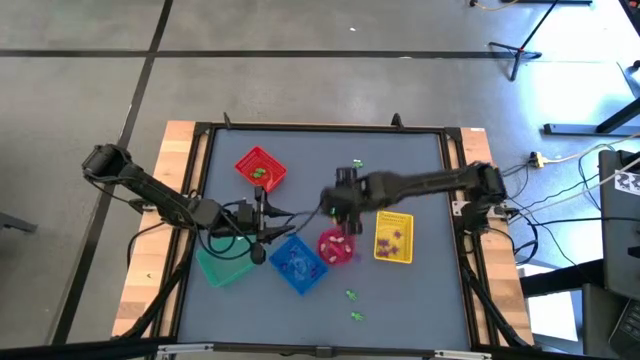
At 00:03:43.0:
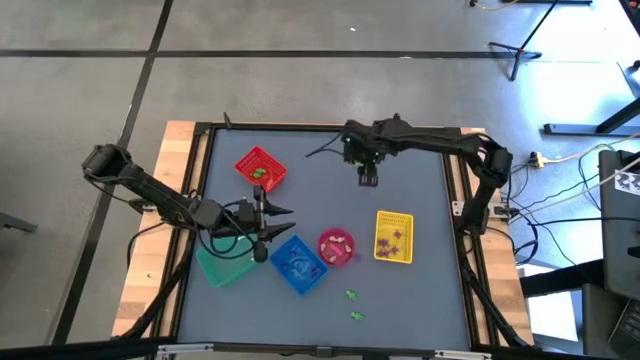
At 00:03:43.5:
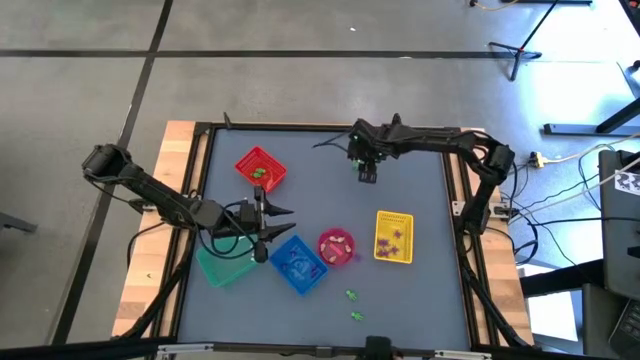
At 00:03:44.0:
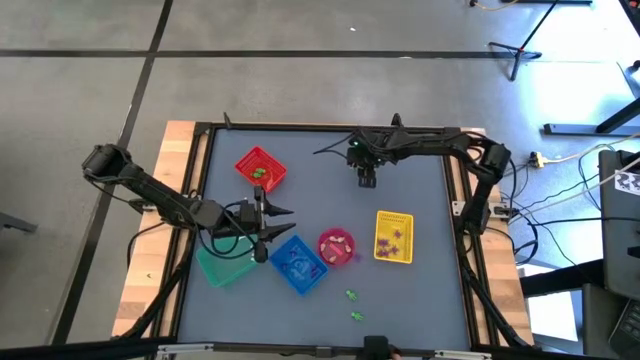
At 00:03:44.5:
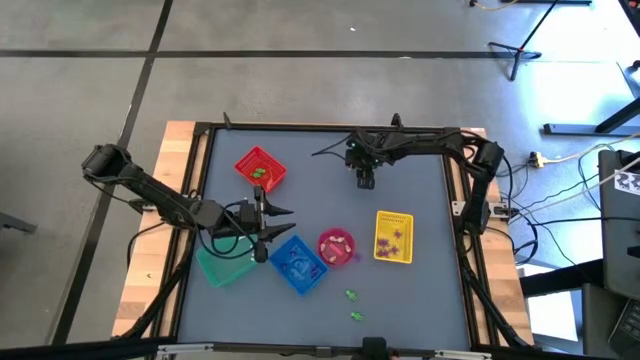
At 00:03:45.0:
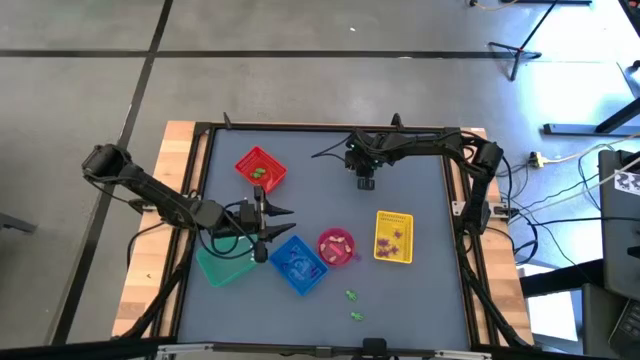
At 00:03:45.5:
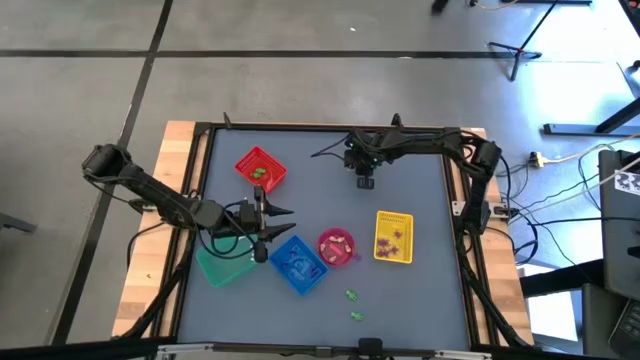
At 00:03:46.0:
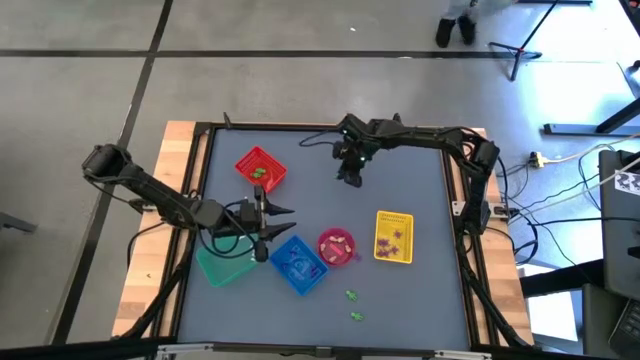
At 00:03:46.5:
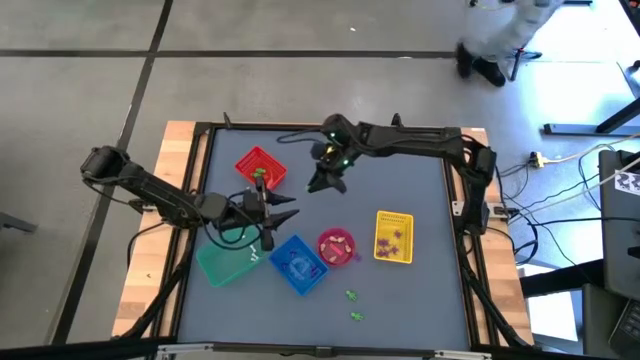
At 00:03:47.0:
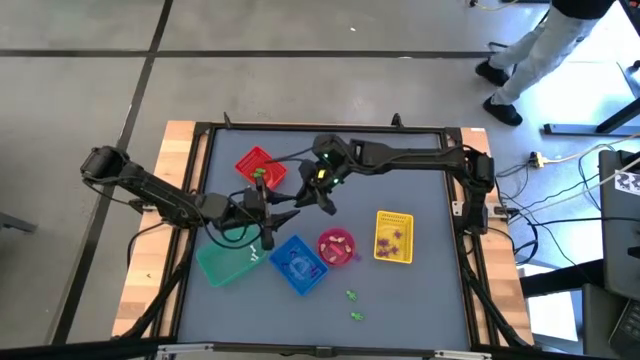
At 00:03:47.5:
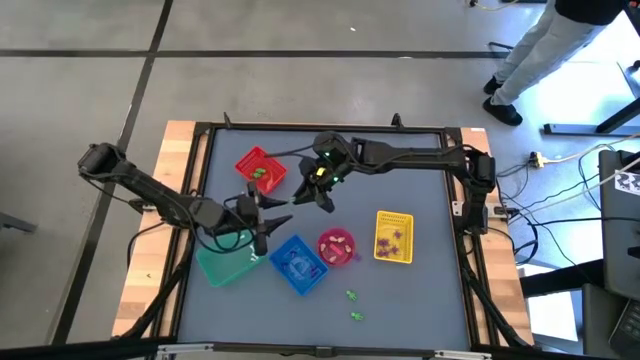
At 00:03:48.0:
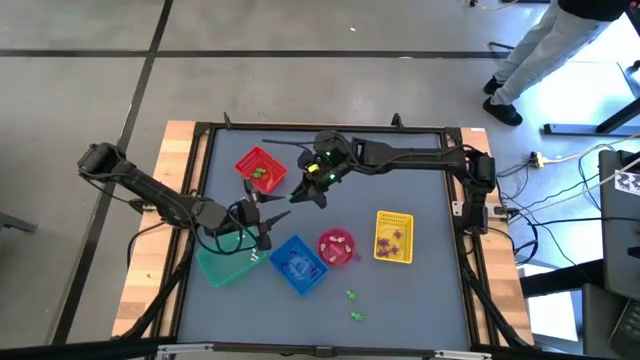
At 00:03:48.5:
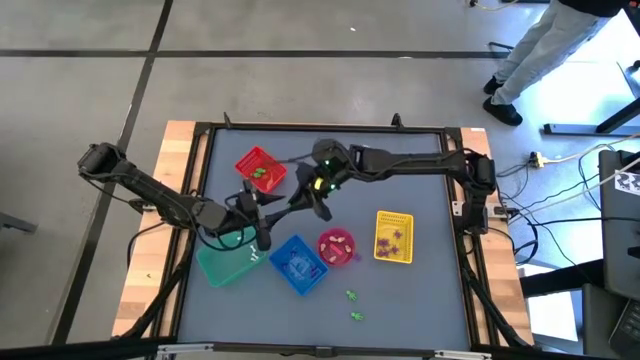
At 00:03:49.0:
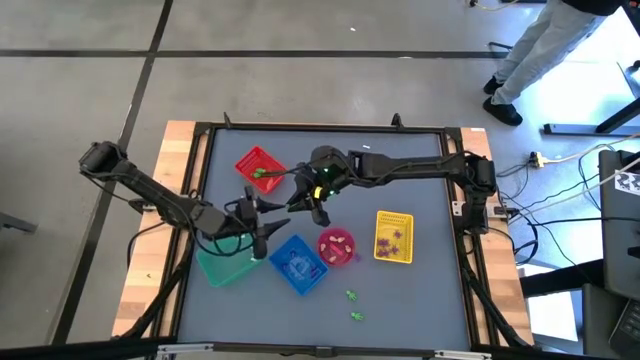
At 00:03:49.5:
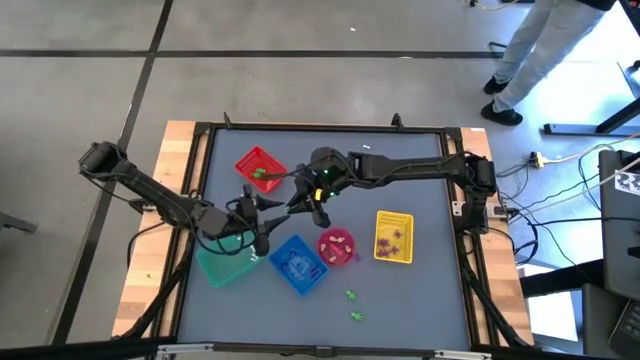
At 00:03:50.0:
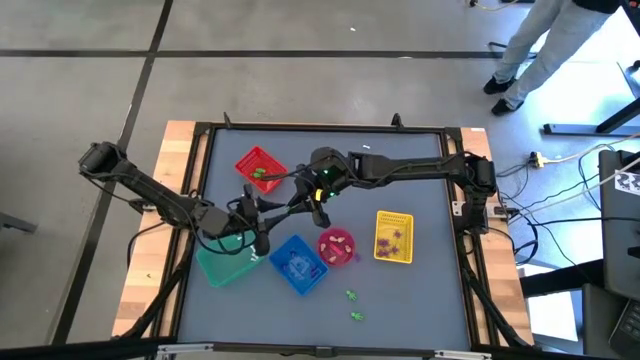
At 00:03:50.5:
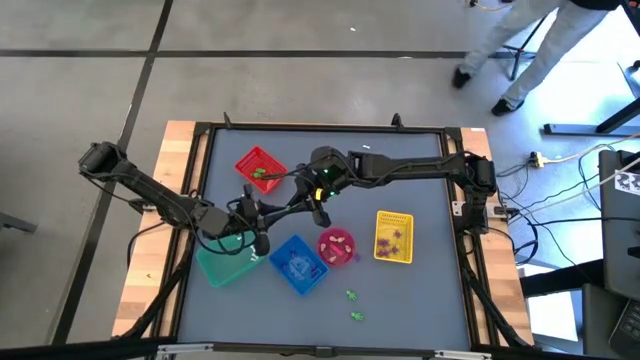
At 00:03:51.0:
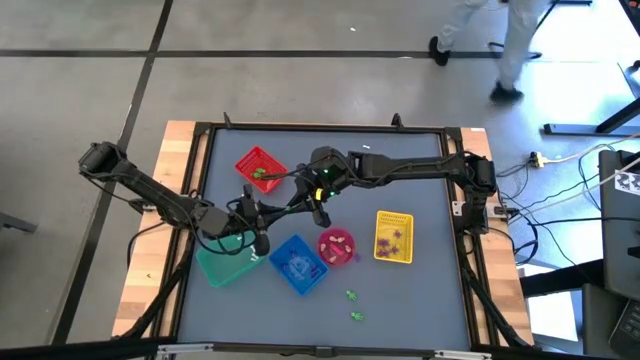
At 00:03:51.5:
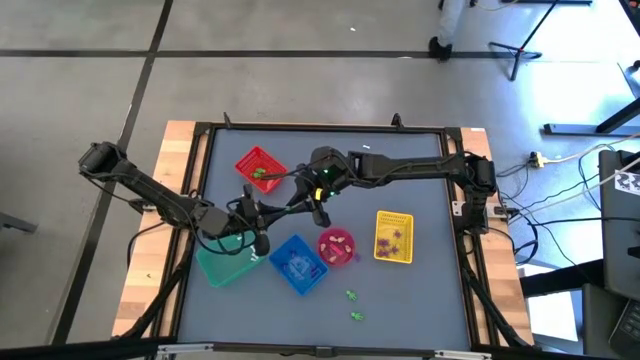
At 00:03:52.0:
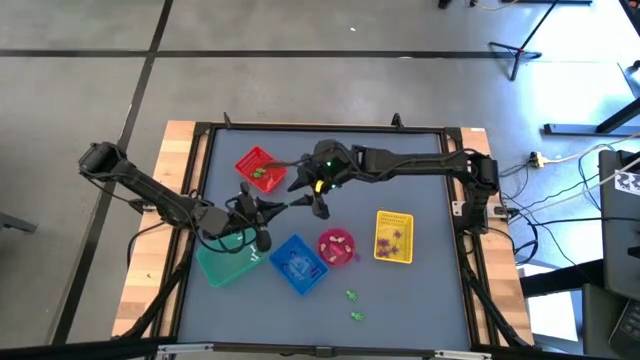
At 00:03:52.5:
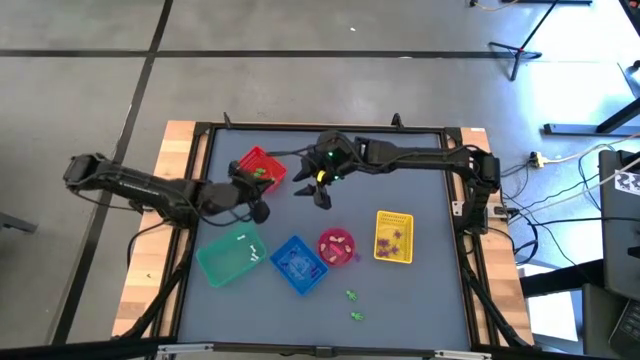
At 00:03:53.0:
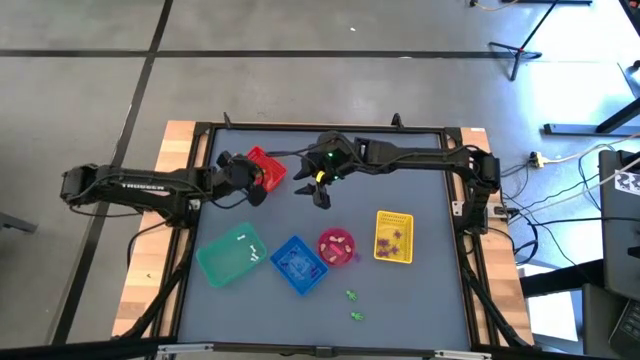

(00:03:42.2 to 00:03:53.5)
Task: Sort Halloween decoration
Put the green skeleton toy into the red bin

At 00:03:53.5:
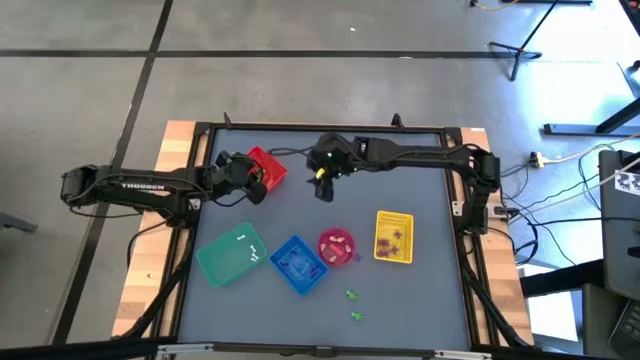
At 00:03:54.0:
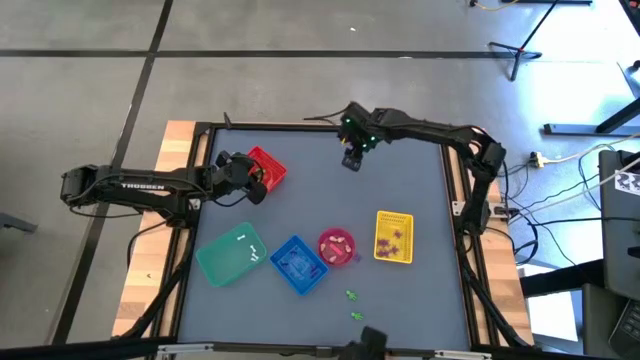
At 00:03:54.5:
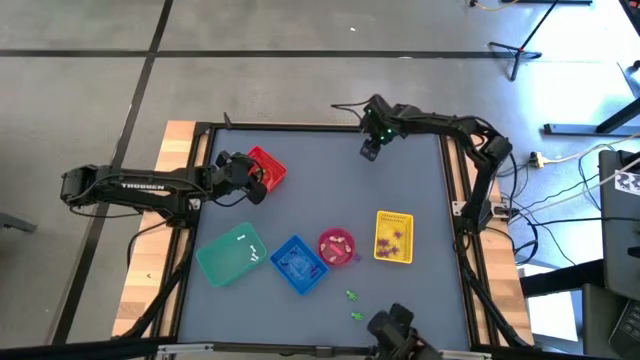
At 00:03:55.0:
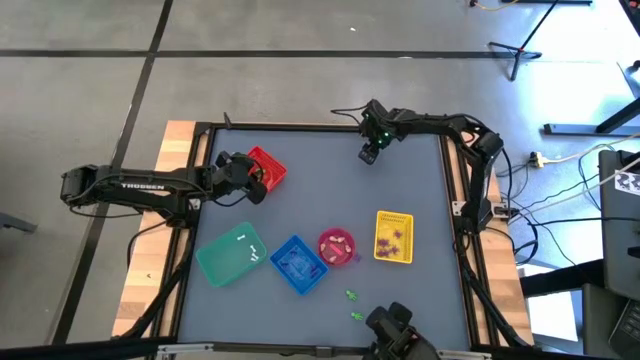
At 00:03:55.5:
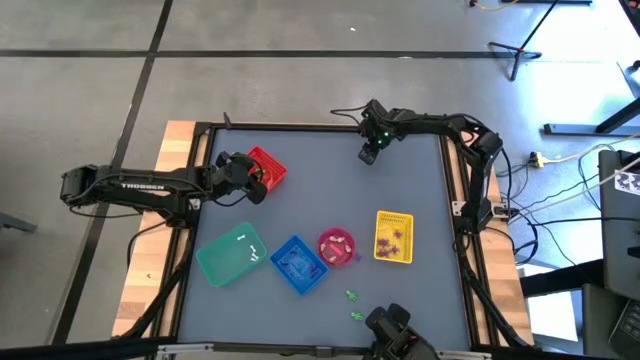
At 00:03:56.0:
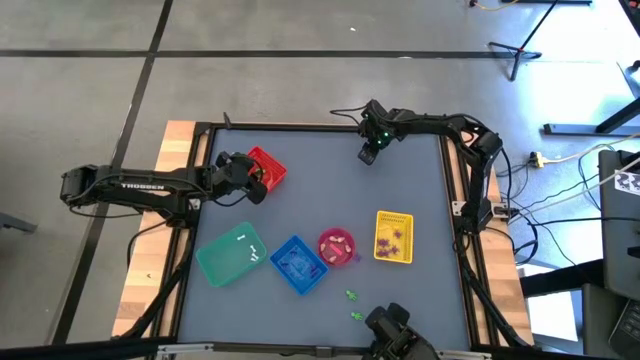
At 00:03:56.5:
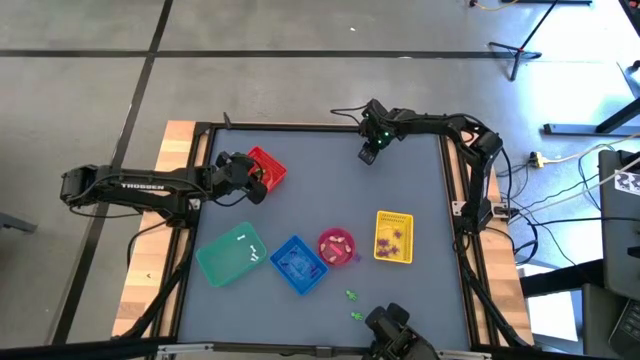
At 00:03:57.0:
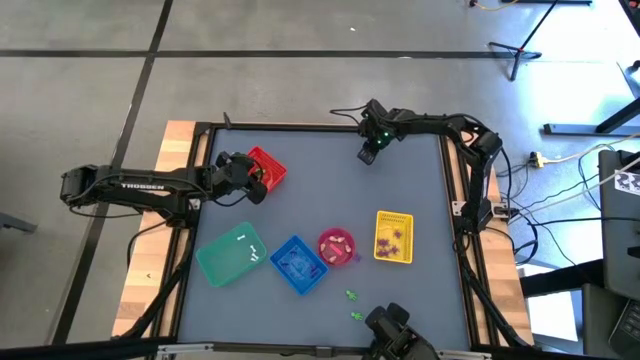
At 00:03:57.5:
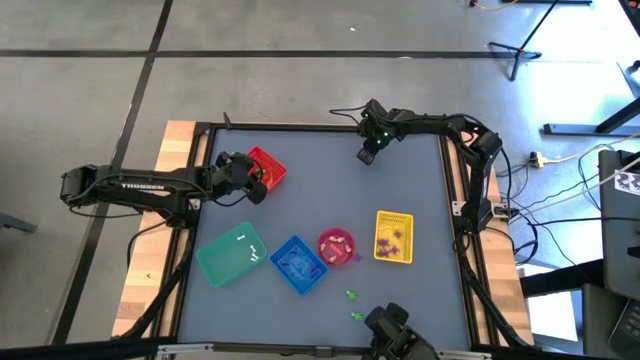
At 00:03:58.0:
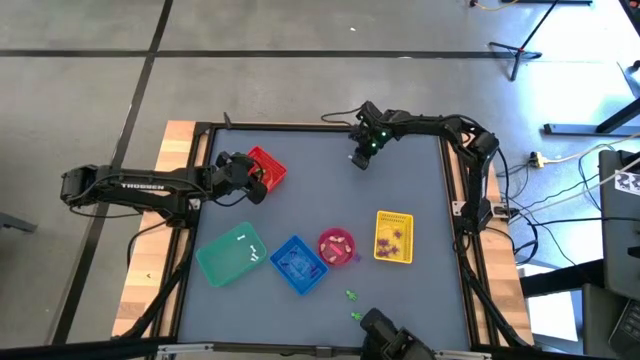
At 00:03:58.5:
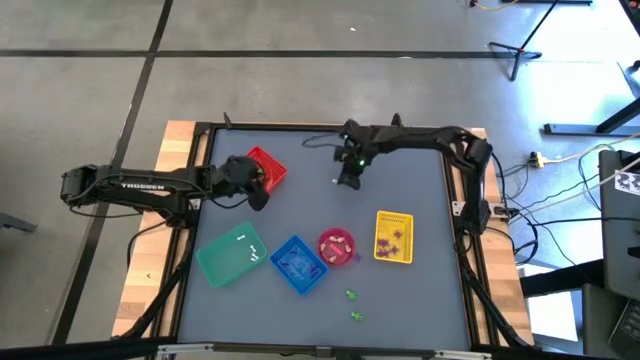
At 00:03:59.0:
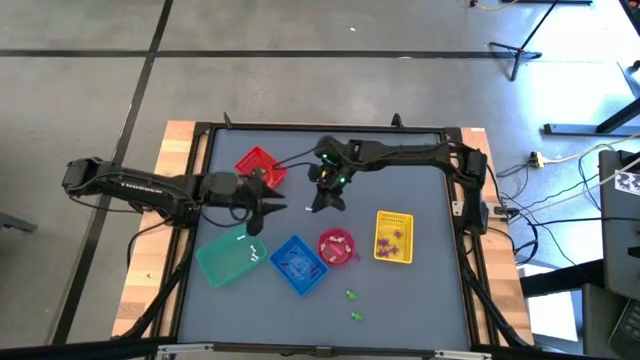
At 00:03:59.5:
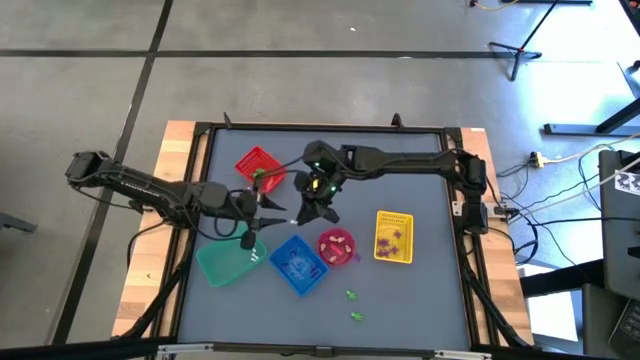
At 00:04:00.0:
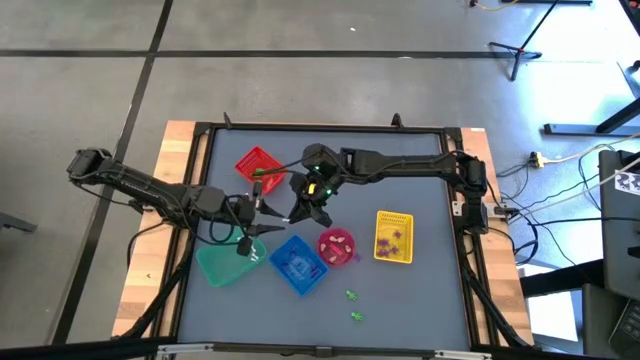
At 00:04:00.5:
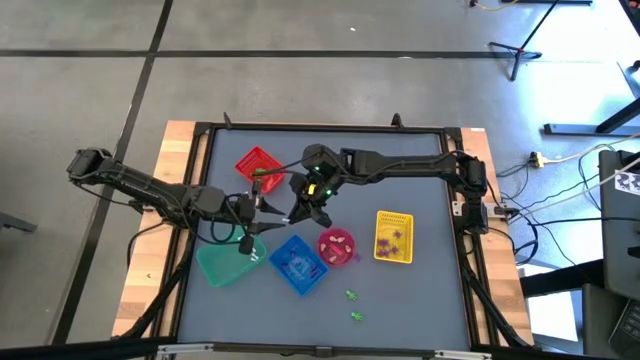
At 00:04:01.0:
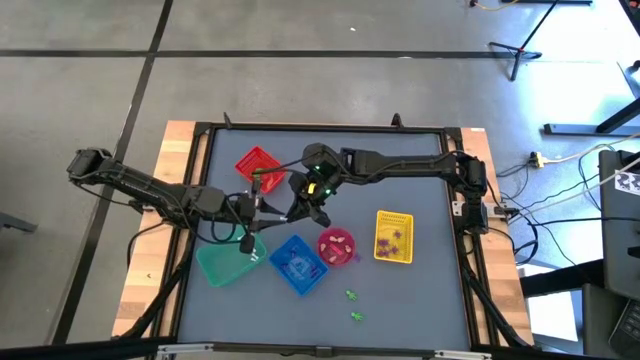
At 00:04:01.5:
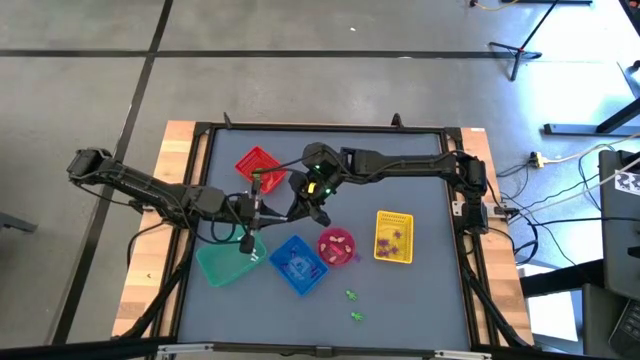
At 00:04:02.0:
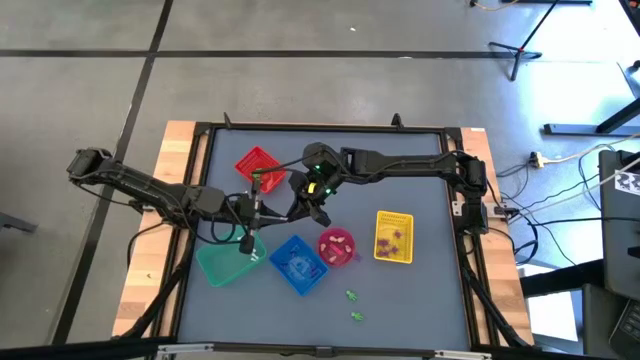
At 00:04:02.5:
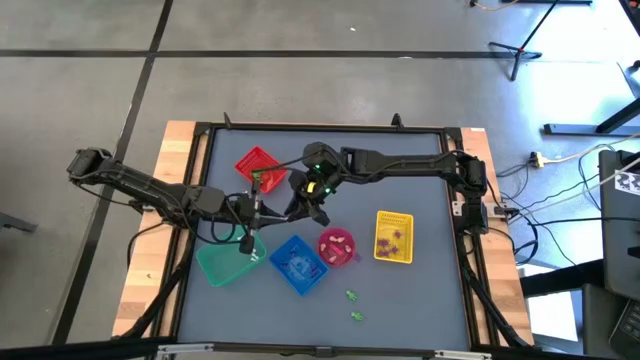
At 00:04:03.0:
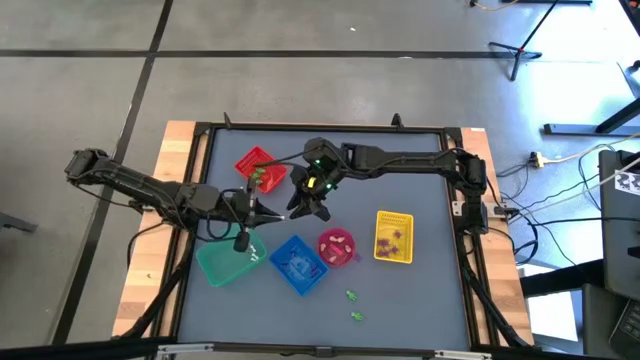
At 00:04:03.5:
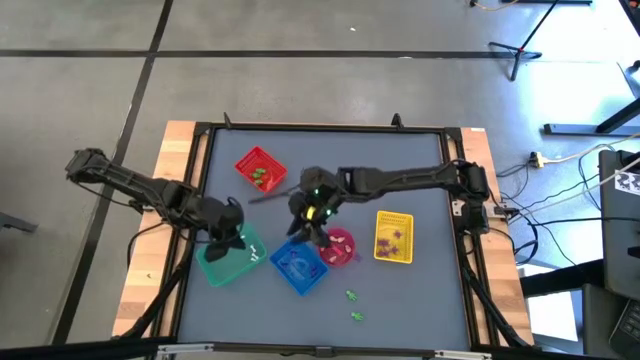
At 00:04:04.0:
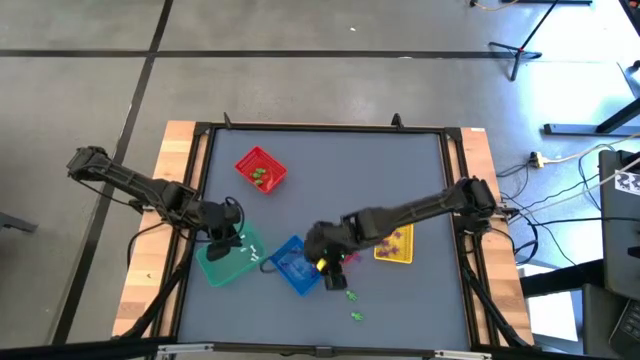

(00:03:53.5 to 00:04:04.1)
Put the white bone toy into the green bin
